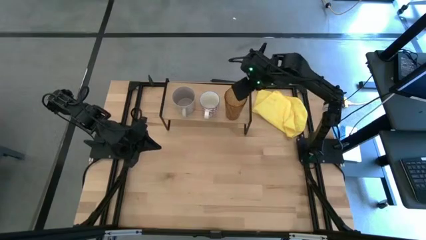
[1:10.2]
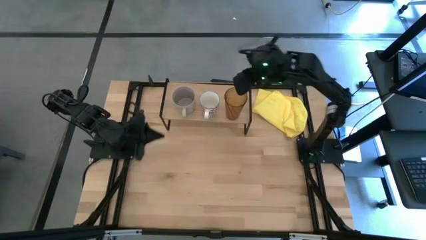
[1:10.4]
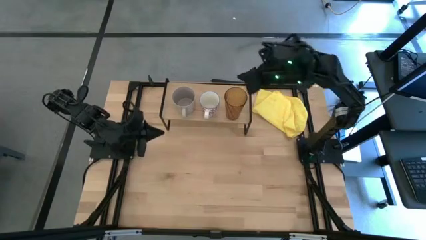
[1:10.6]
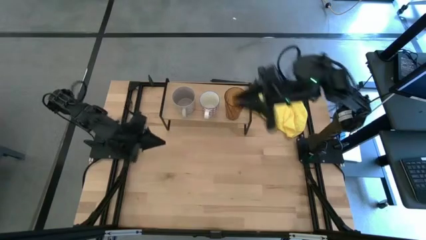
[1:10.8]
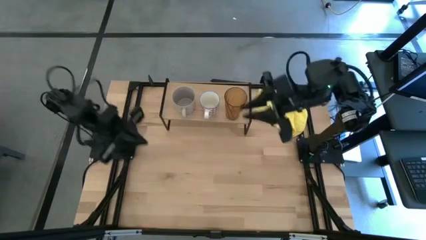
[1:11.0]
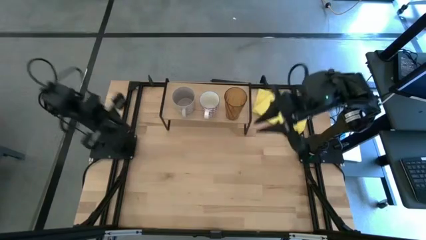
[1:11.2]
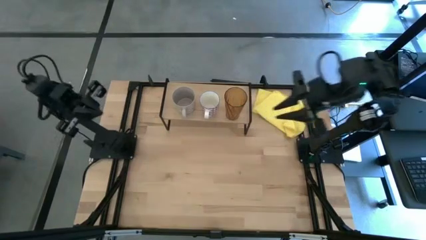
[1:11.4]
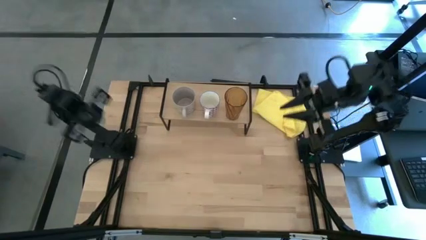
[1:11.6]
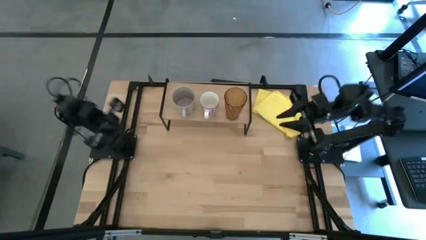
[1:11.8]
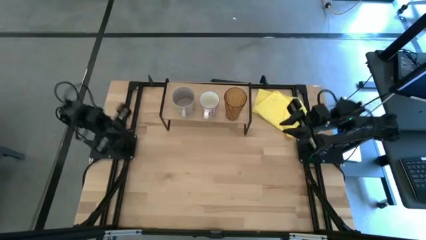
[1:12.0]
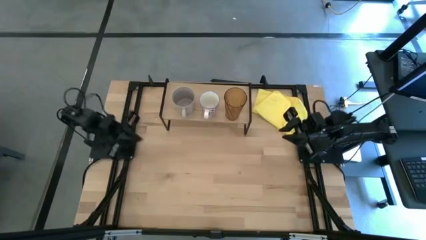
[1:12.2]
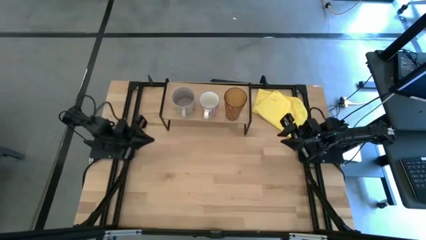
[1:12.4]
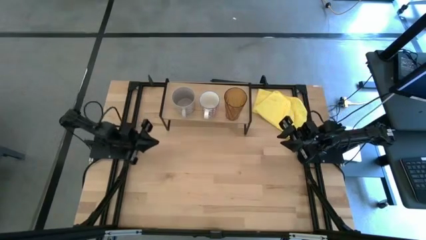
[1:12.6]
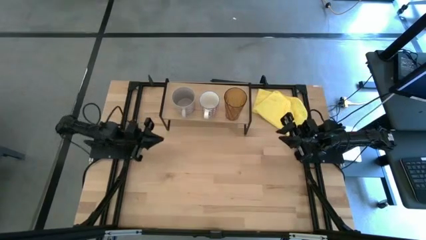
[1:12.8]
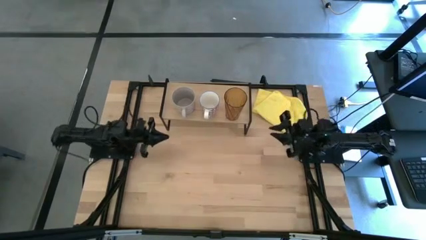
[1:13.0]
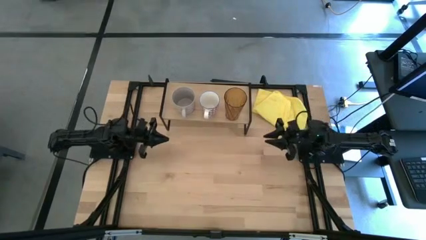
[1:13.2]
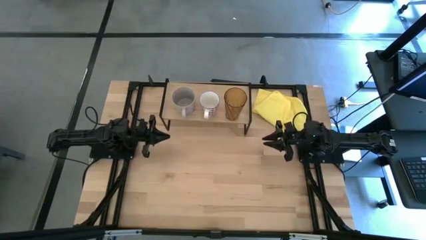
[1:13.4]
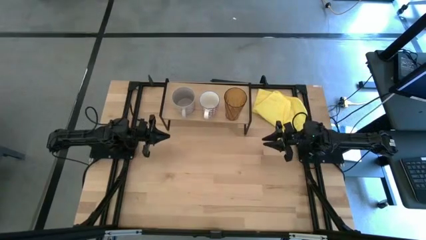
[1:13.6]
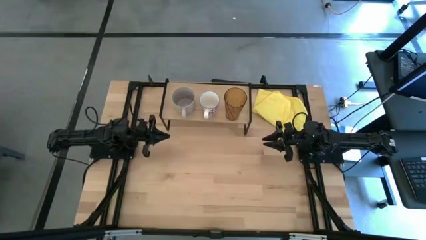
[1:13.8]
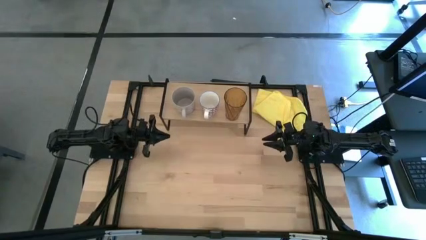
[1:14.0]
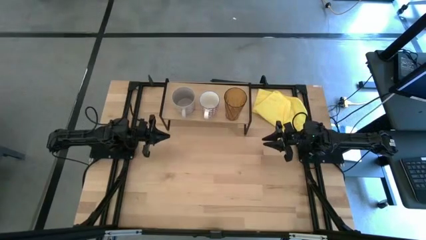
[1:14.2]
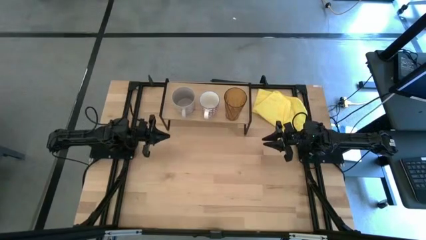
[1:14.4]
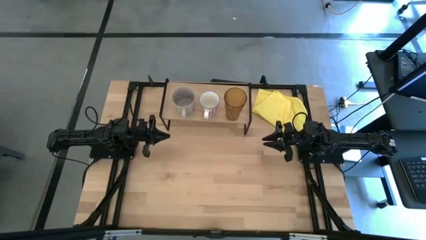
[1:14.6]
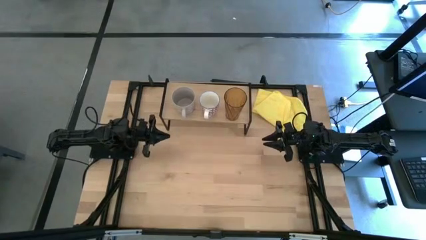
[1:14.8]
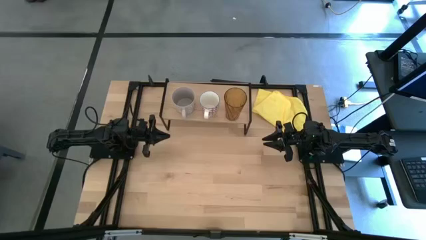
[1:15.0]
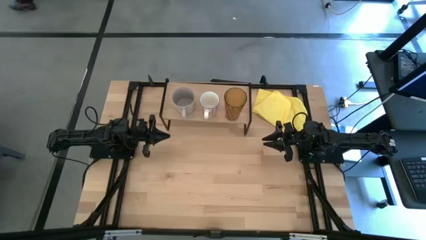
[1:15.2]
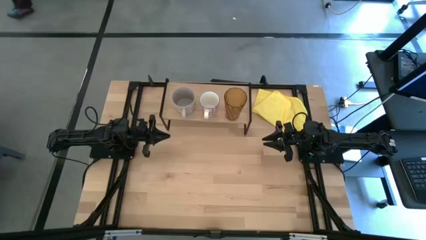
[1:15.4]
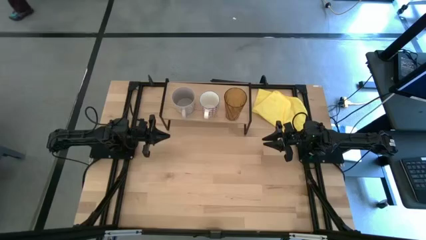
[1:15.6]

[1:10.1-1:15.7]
Task: Stack small to large cups/mugs on shelf
Return to Home Position

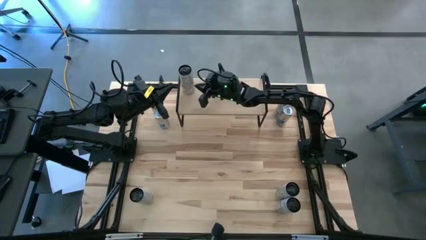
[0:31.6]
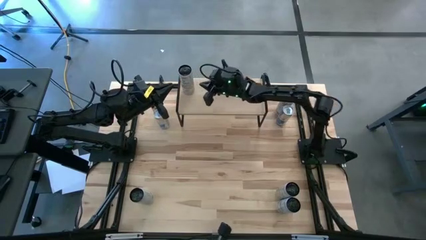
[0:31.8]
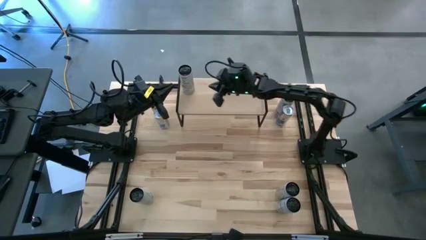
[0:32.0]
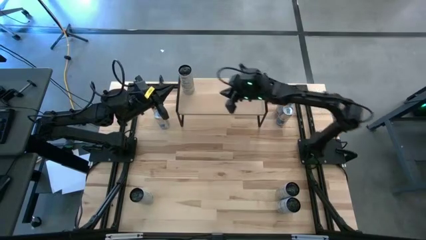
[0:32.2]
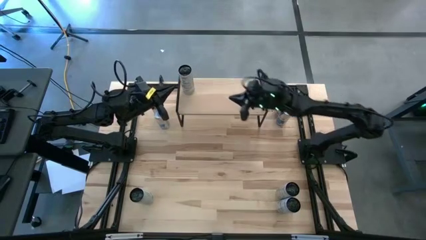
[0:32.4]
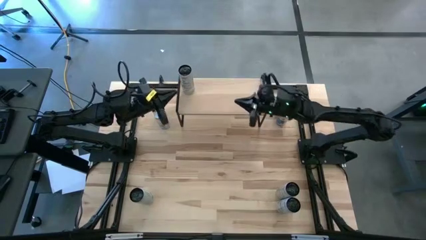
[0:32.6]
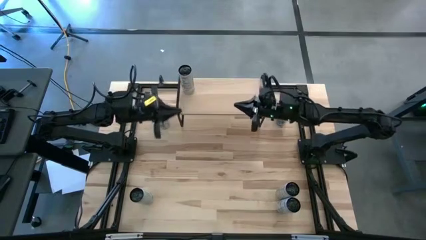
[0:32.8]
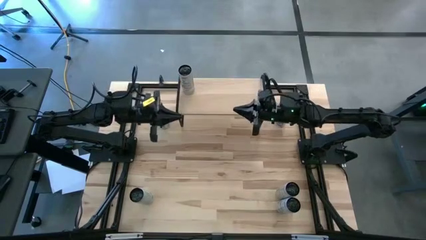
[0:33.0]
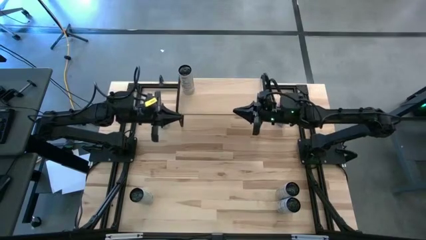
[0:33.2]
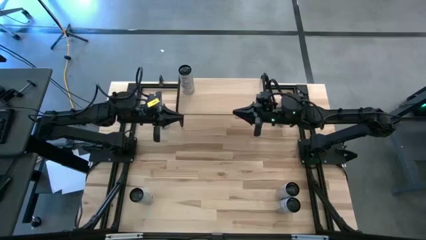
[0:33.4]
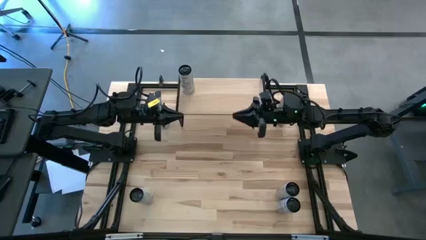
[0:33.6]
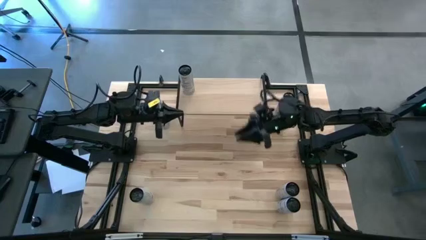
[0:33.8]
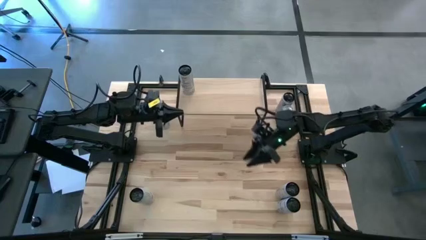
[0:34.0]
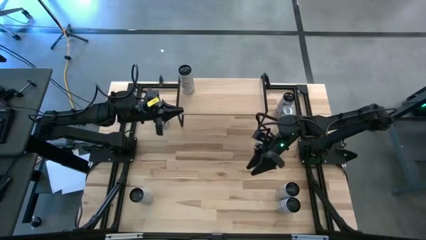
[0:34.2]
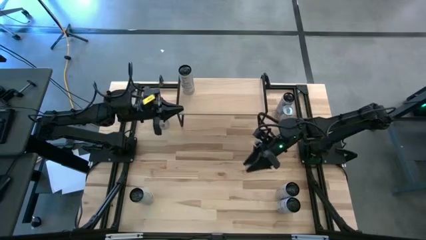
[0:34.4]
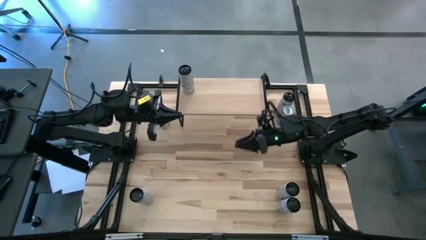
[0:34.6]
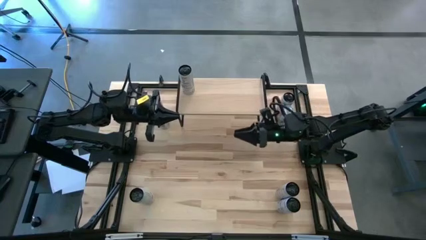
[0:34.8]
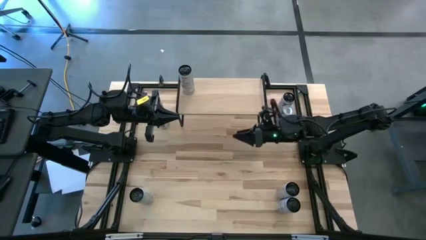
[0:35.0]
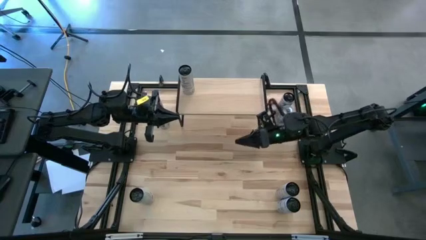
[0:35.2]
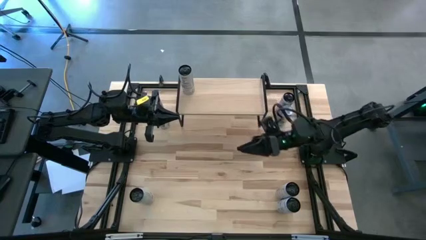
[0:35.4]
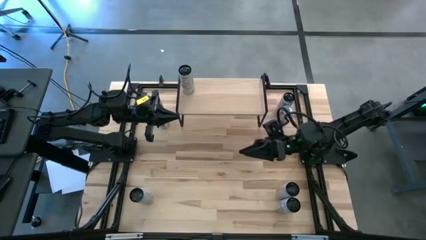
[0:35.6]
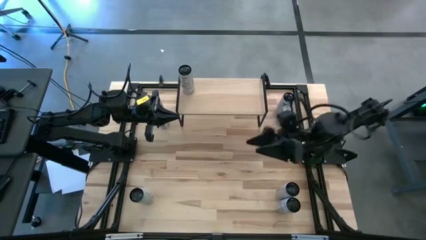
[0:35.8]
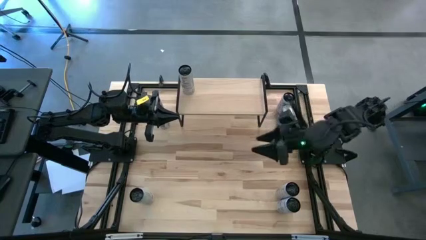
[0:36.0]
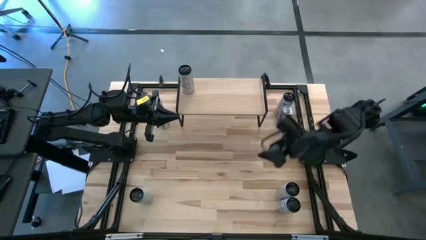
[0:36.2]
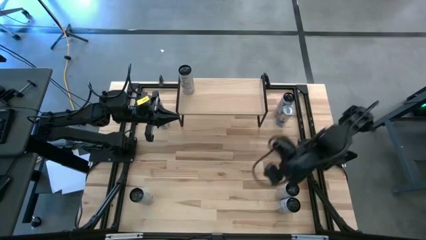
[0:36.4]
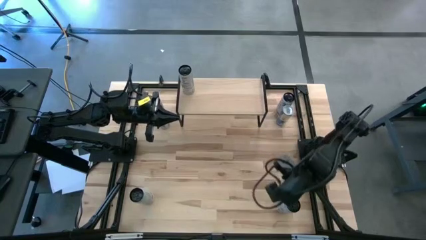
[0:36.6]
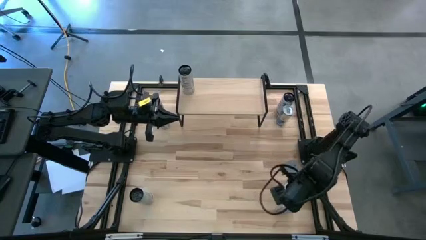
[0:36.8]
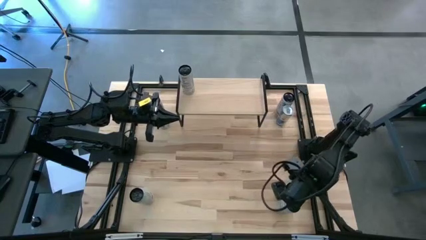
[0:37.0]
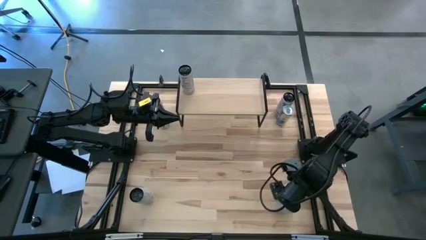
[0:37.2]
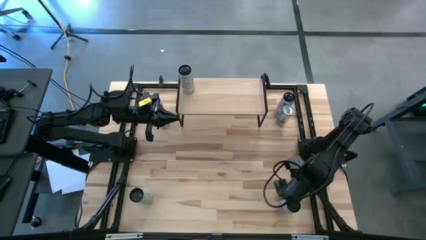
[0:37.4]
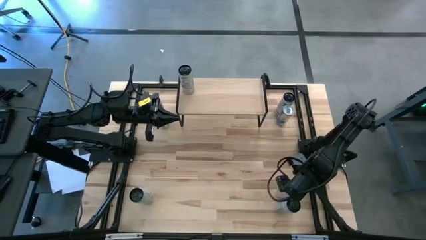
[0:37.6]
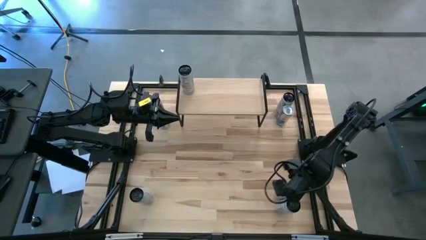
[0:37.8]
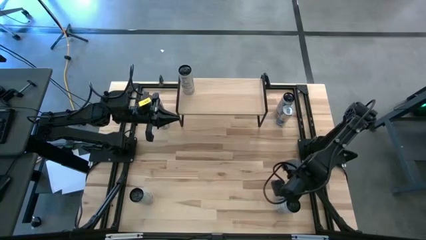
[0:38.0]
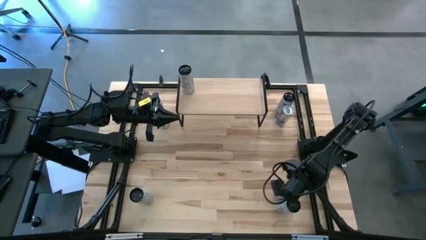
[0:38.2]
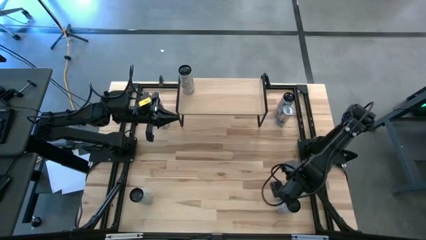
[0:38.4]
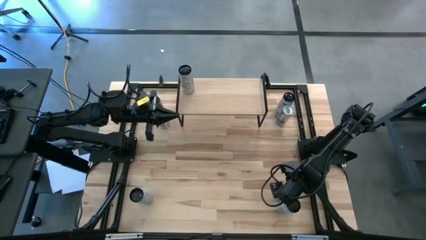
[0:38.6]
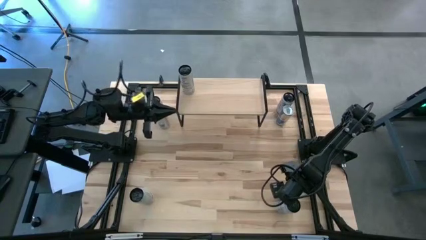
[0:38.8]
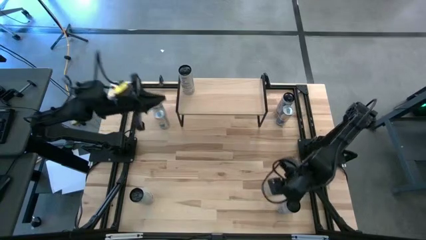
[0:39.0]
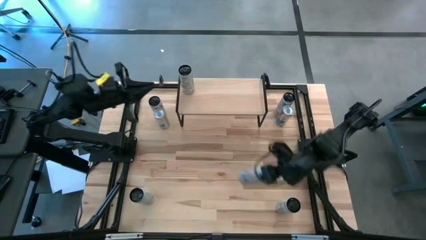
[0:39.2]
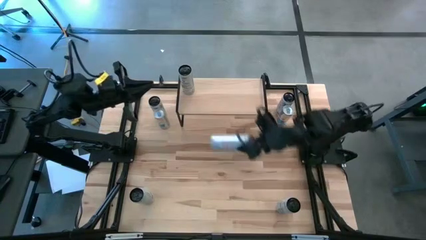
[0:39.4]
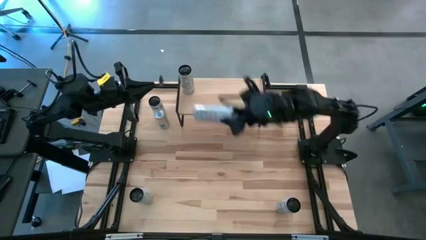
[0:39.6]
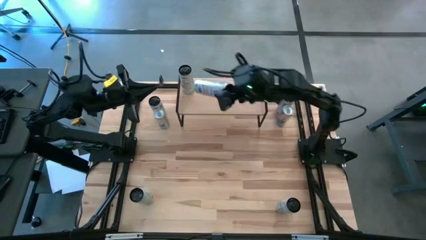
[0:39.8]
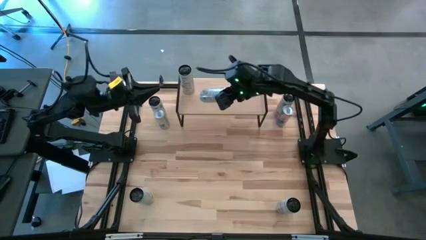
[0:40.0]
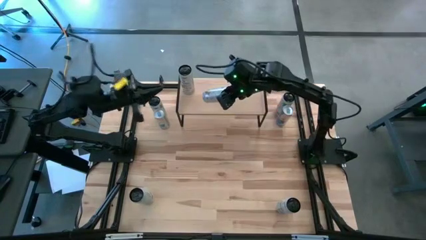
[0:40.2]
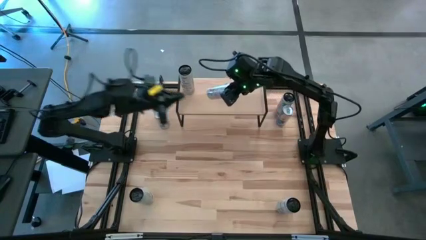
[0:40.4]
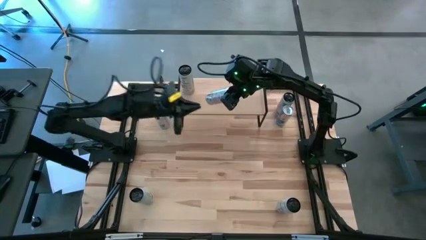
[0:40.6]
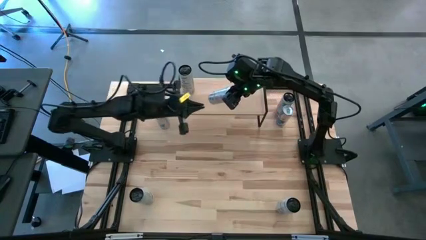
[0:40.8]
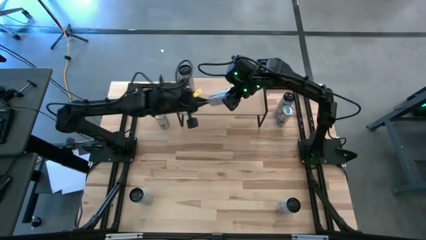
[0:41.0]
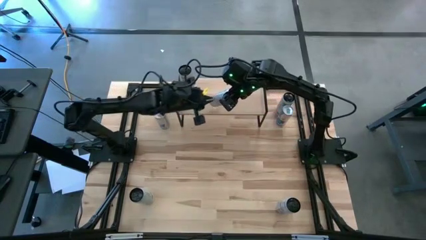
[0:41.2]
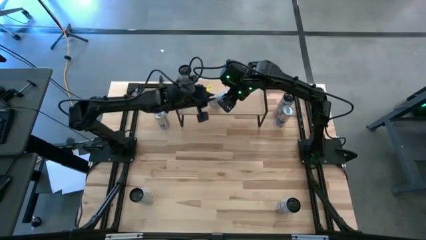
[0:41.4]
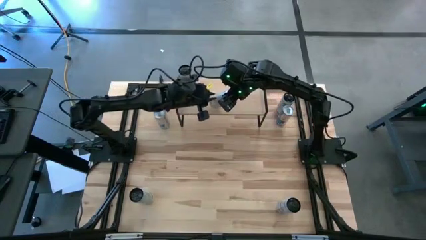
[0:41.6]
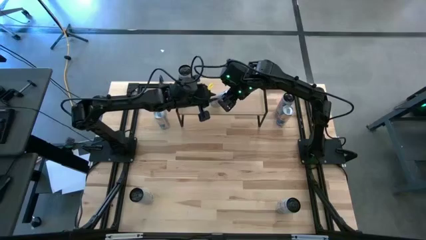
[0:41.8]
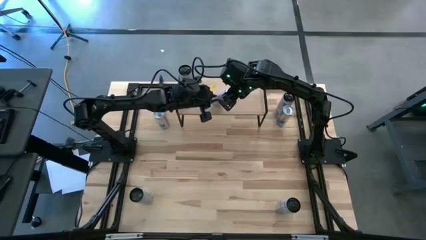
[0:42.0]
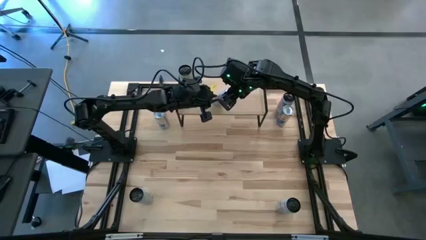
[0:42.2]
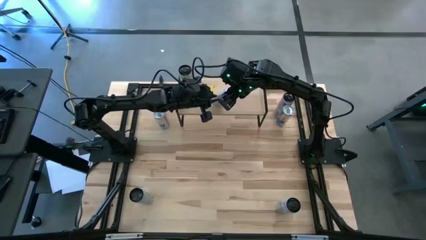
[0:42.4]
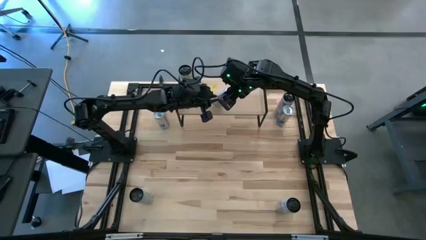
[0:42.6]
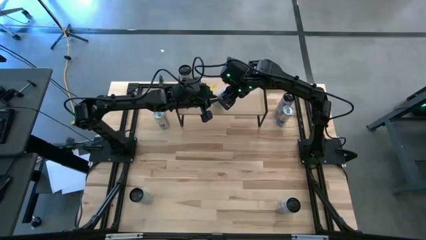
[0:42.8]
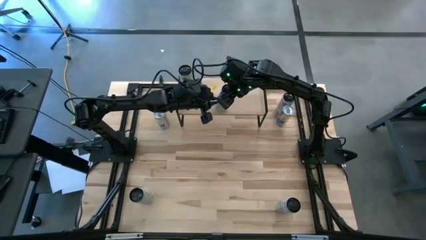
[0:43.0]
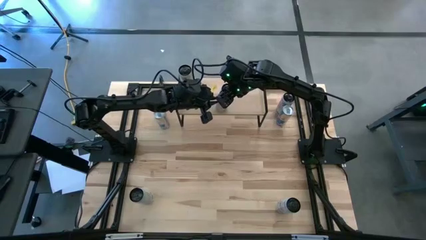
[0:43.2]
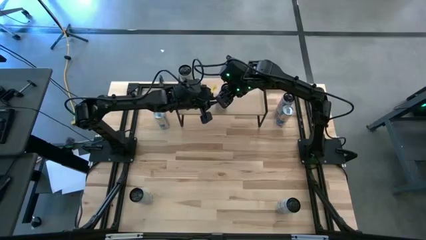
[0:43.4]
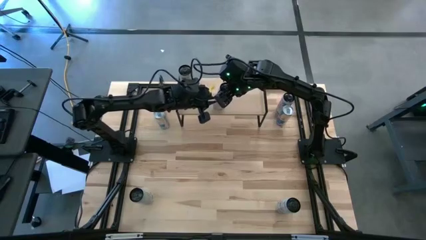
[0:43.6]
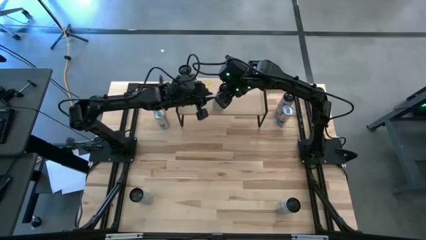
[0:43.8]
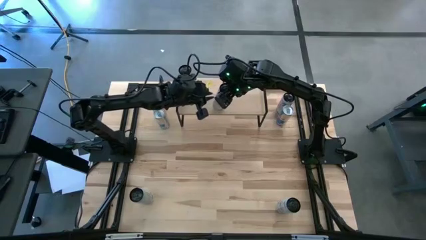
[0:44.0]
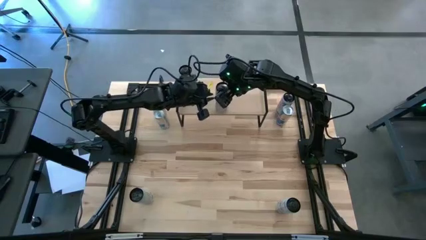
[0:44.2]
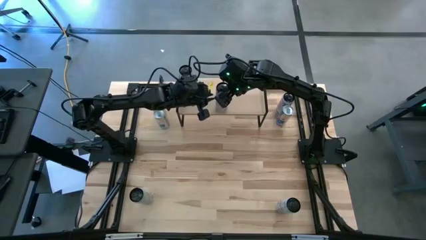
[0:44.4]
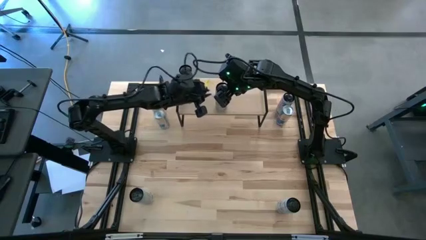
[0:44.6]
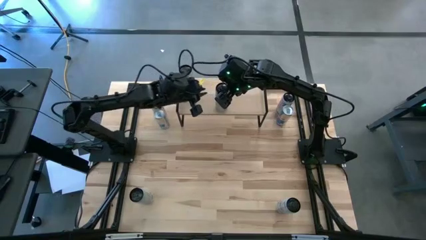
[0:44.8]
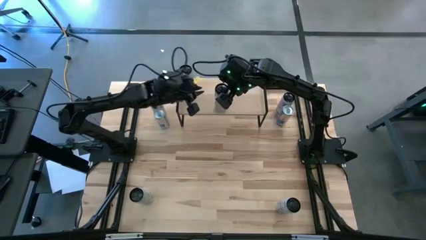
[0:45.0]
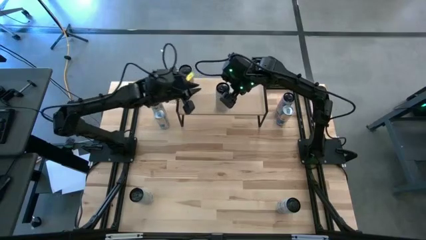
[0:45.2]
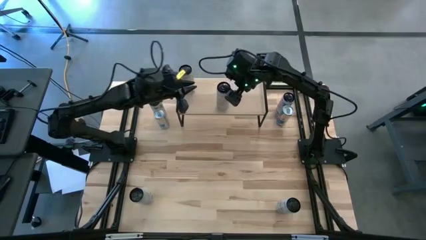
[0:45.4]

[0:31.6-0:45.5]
Task: Place canned beverage on shelf
Put the bottom right black soda can on the shelf
